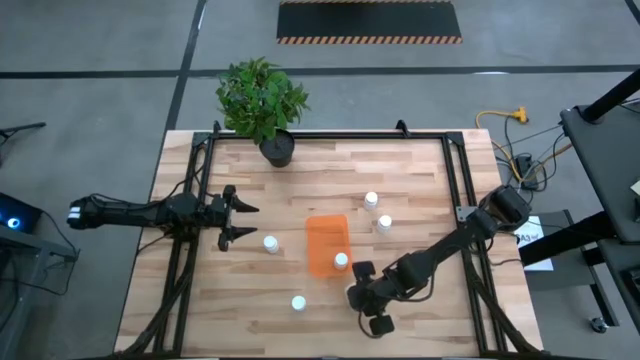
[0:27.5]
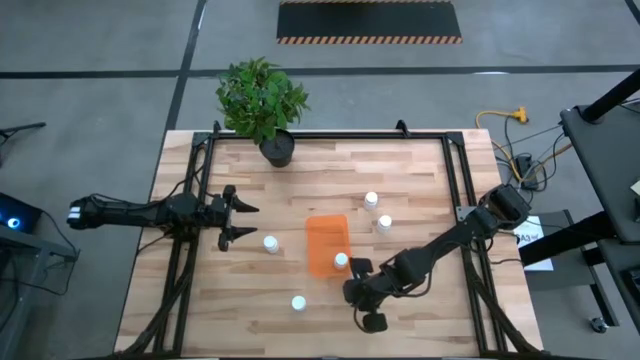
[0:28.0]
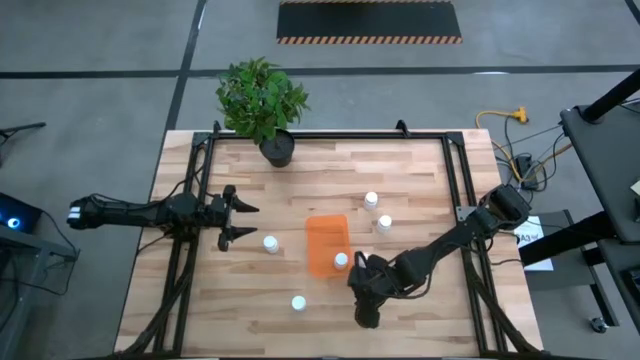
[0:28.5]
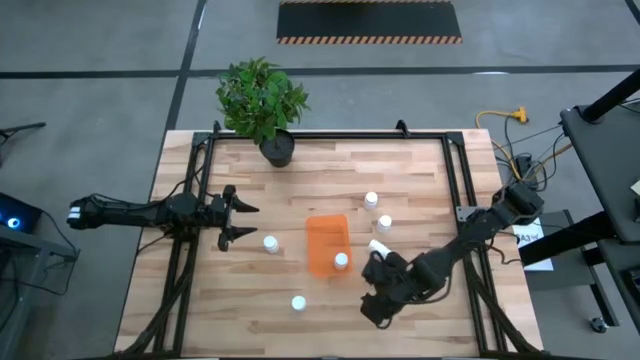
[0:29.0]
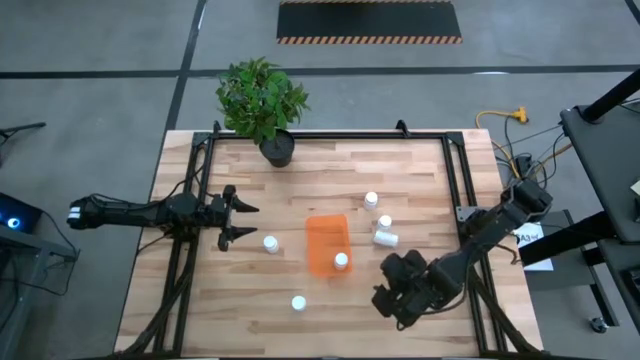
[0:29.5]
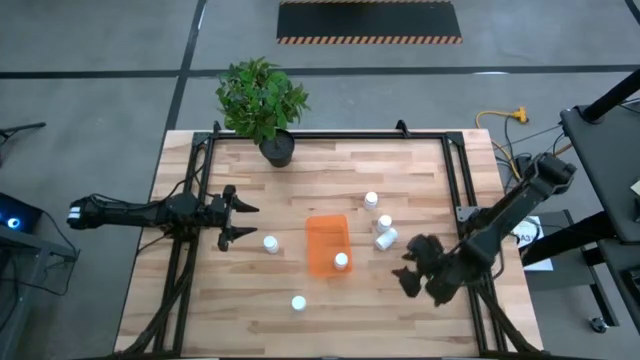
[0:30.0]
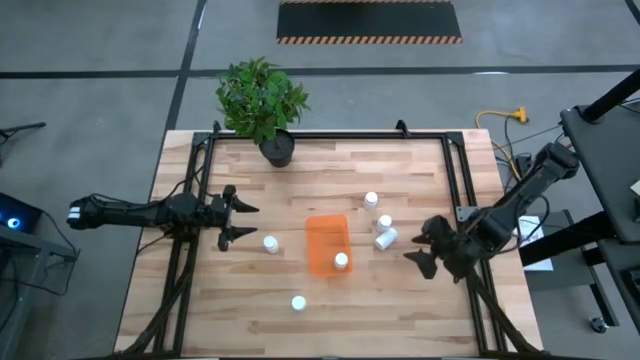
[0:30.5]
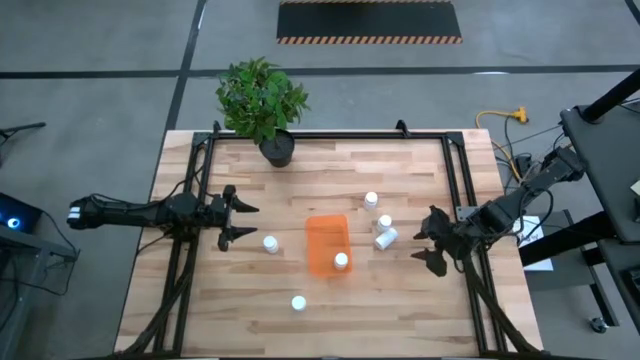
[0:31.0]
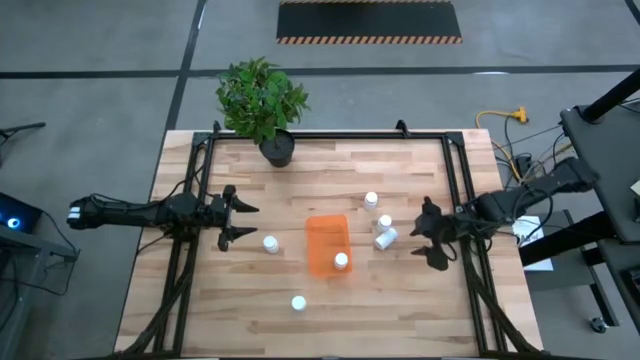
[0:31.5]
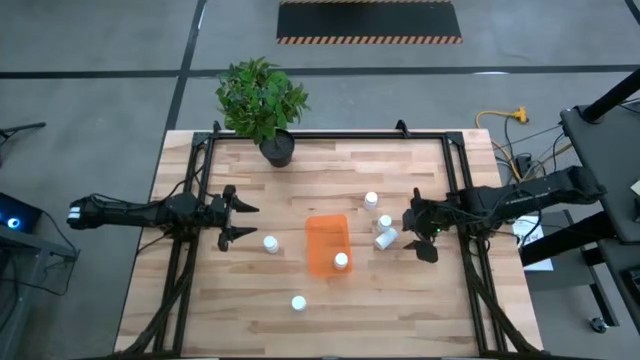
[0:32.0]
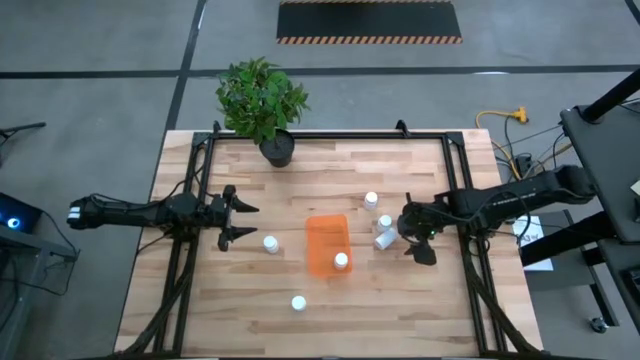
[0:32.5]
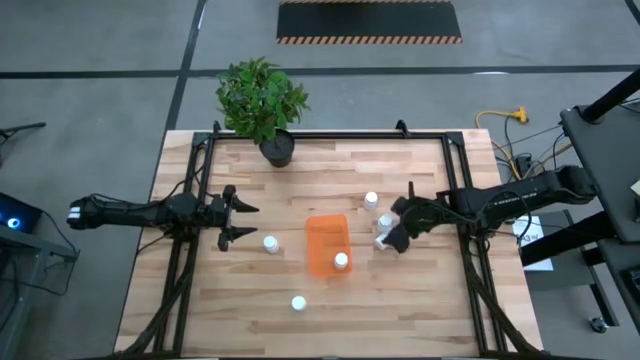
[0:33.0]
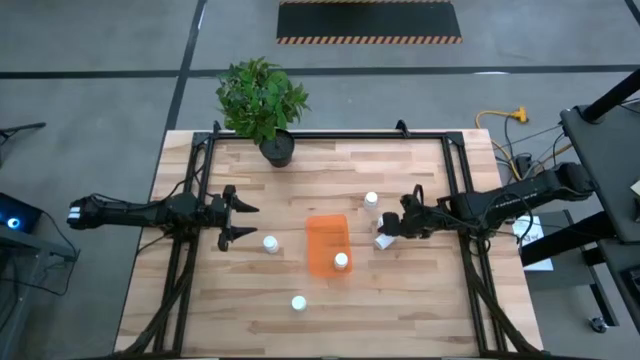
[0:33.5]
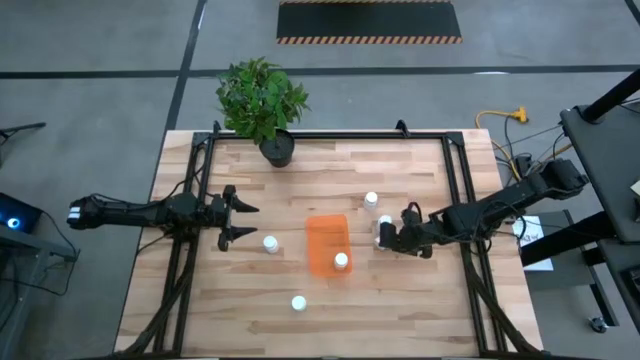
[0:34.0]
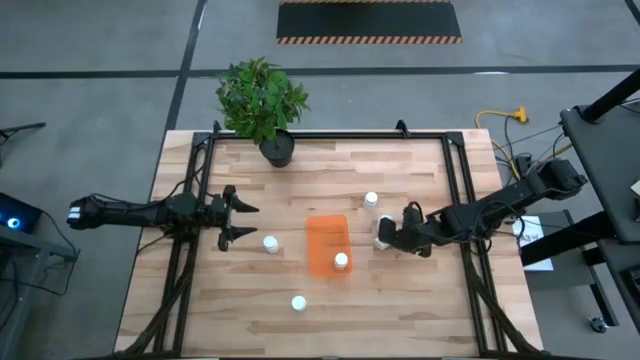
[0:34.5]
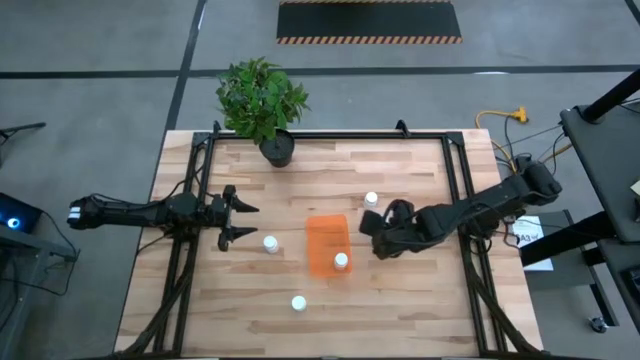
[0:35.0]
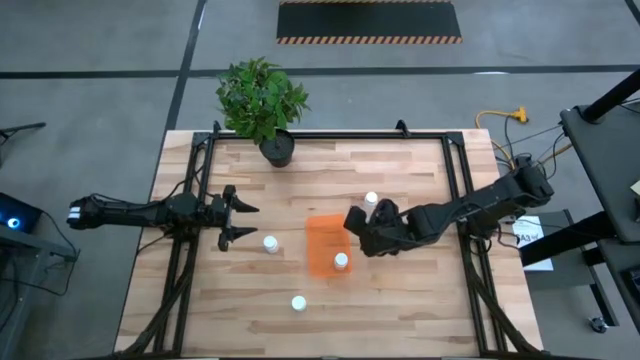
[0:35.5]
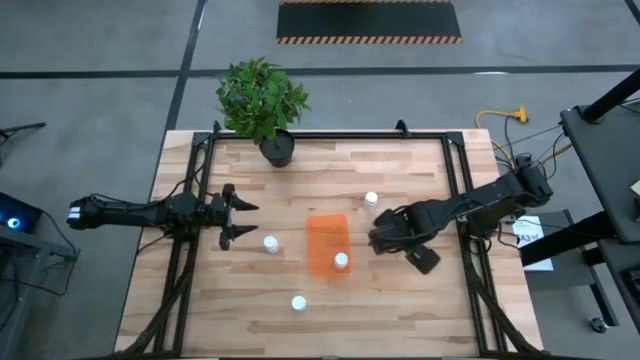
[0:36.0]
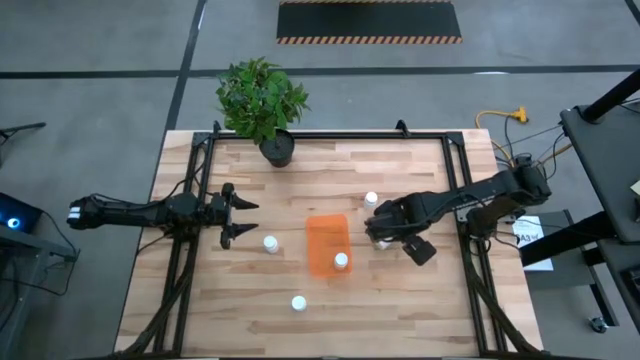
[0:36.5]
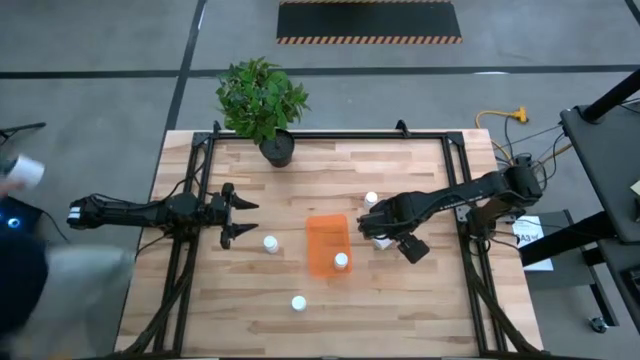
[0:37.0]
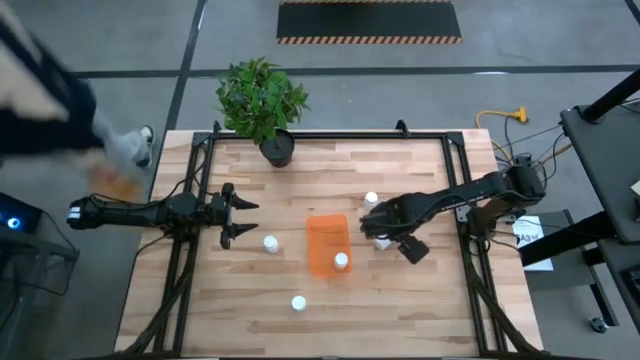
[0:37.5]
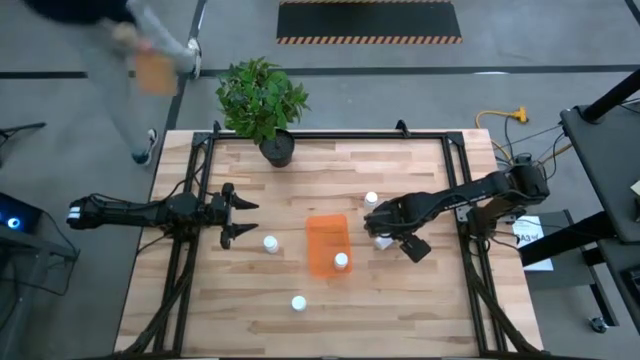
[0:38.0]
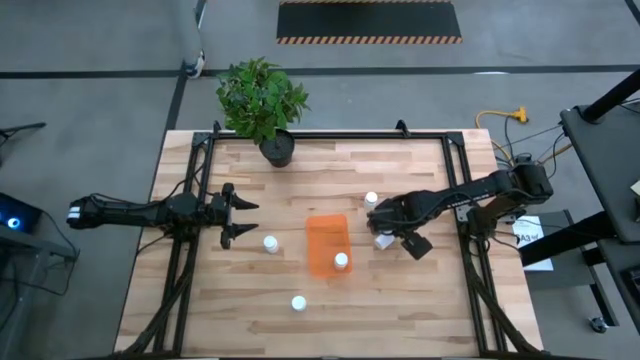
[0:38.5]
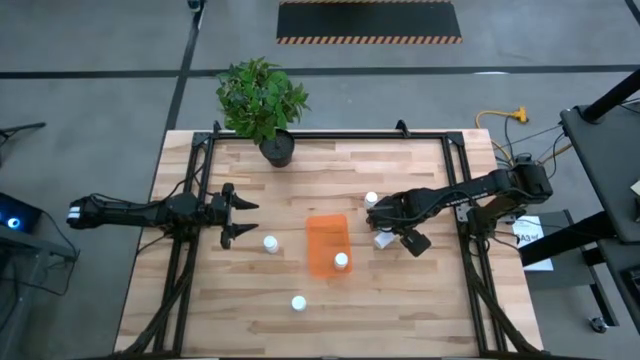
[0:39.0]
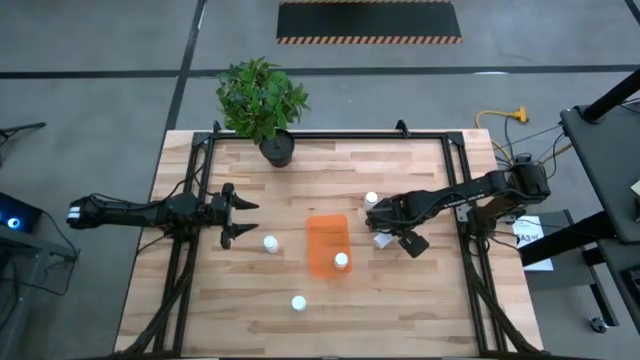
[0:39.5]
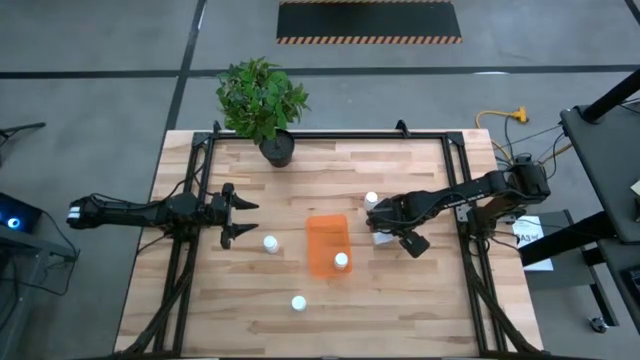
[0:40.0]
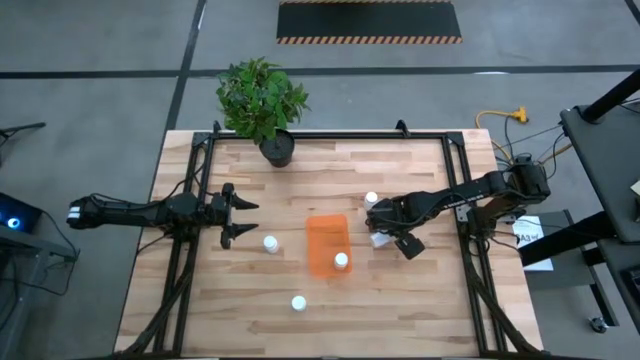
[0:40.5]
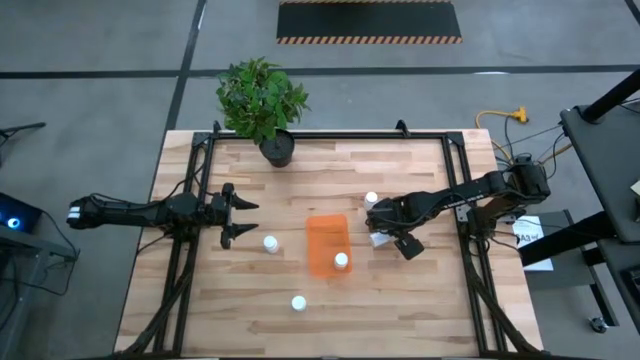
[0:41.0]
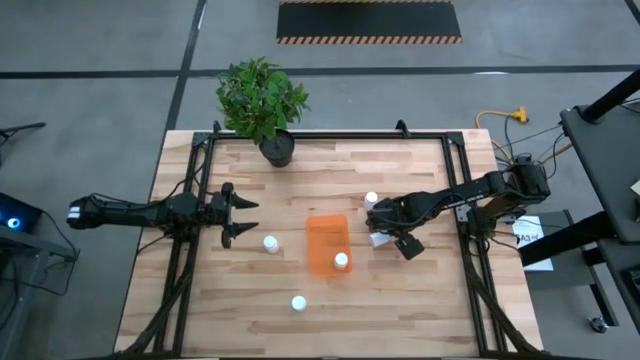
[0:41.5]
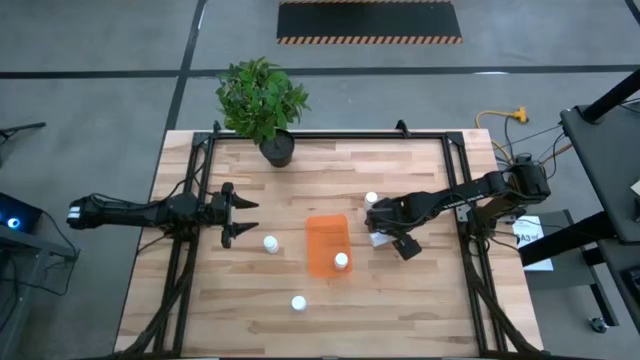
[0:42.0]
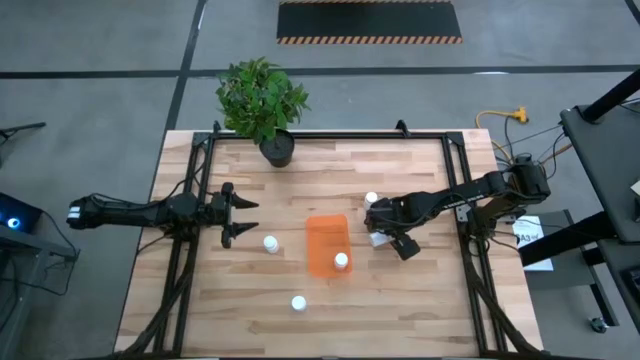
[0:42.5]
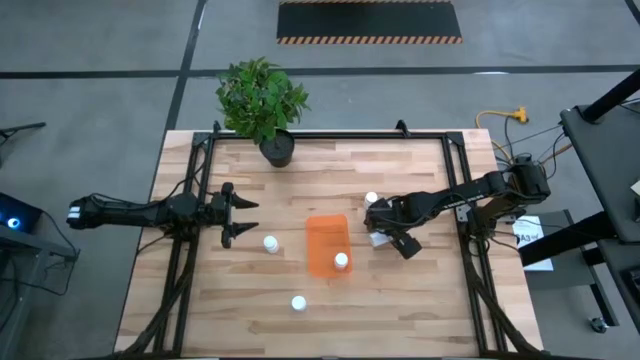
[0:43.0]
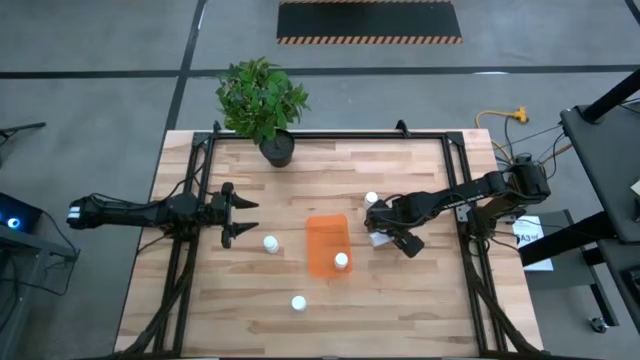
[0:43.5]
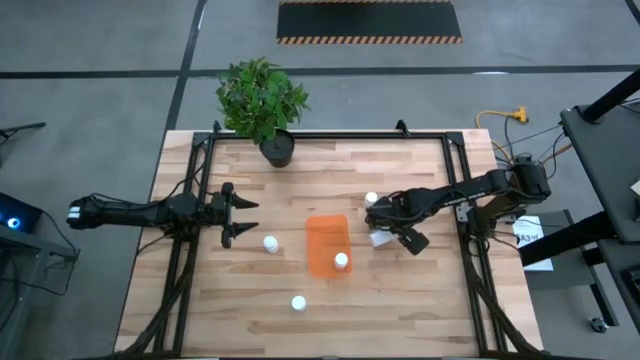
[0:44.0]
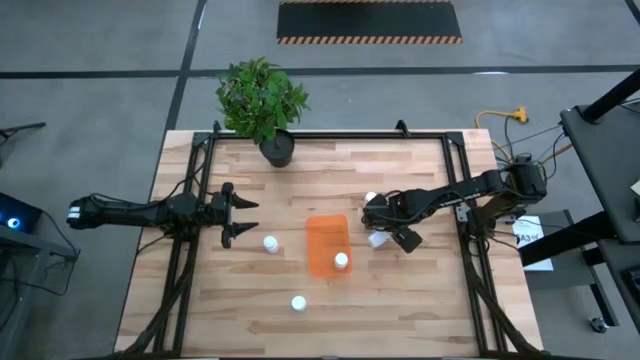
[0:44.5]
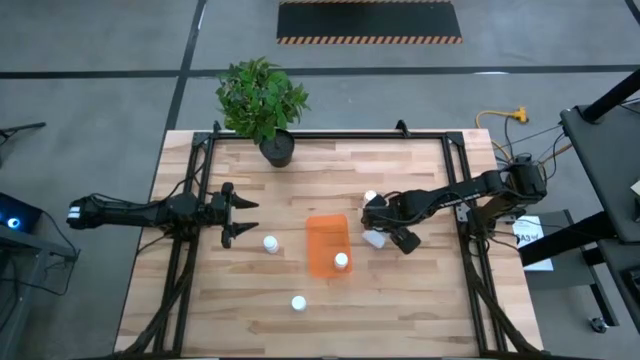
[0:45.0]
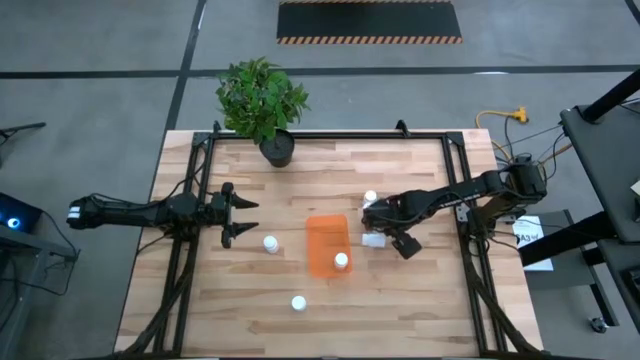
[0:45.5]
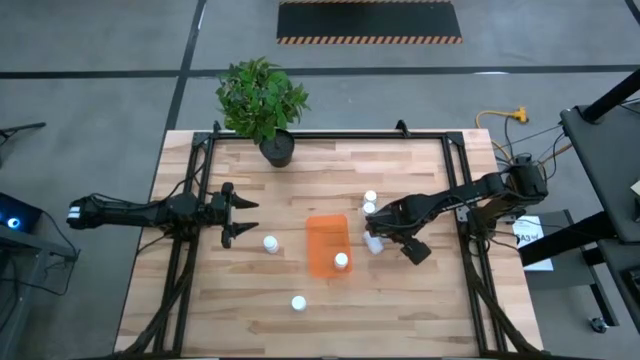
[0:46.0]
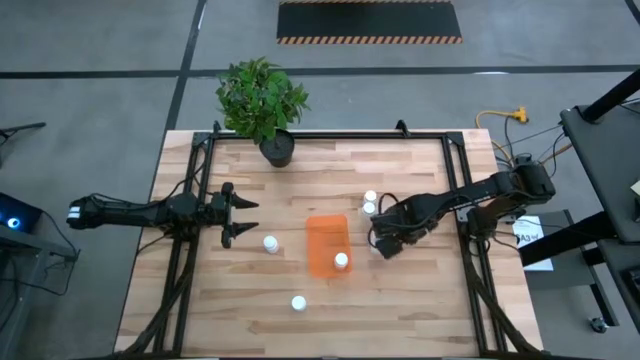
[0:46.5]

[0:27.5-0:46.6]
Task: Pick and place pill bottles into a basket
Put the white pill bottle into the orange container

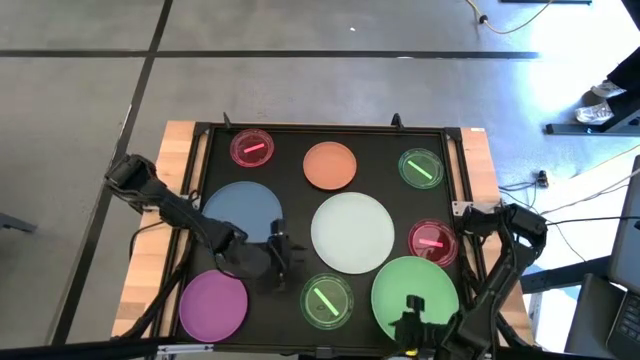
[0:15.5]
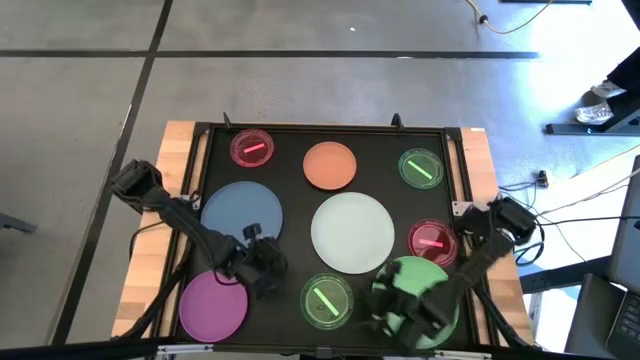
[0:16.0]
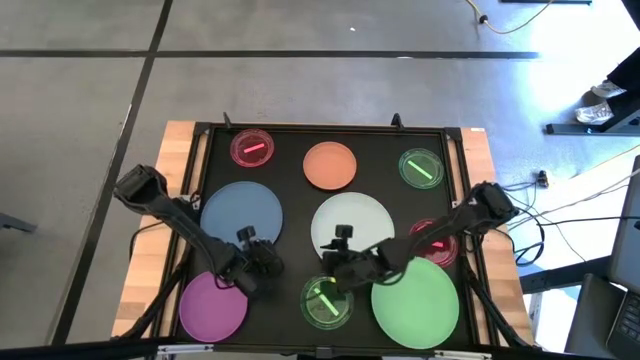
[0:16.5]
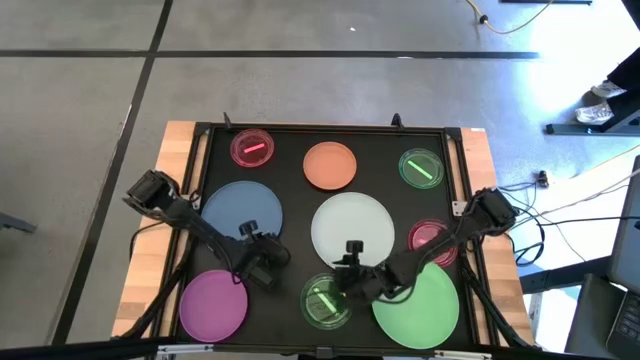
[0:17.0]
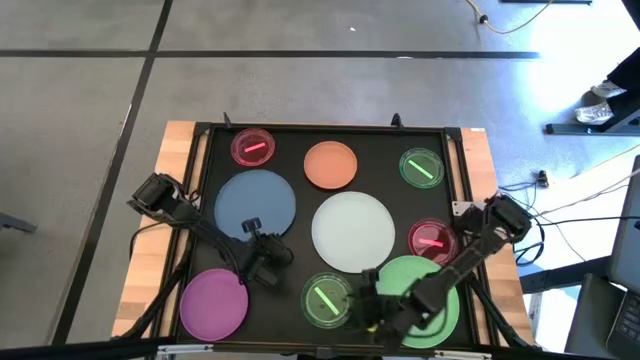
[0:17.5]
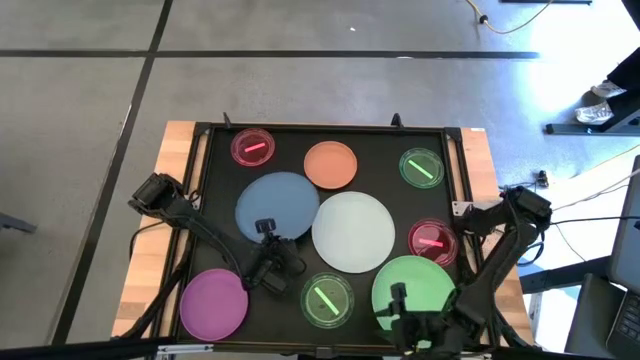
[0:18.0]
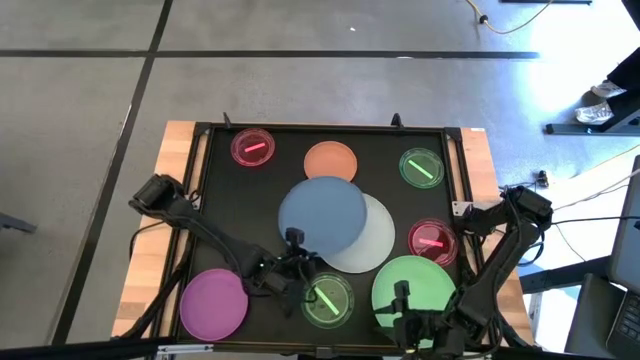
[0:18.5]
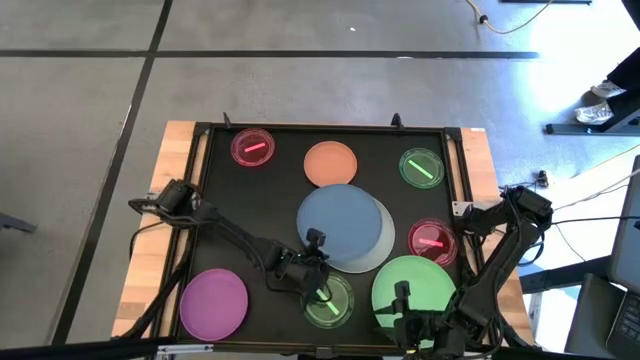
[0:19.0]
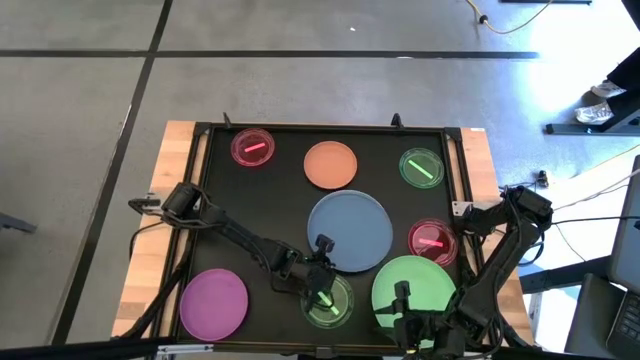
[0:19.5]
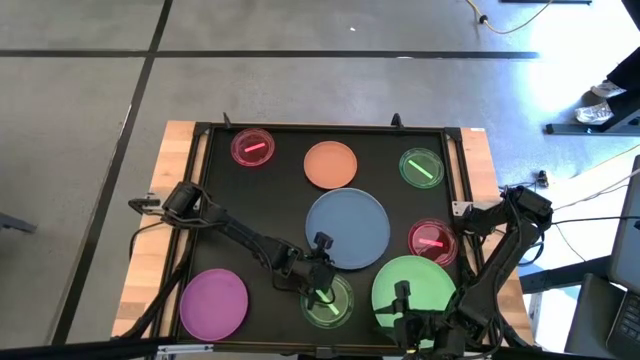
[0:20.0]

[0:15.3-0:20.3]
Task: Stack plastic plates
Stack the blue plate on top of the white plate
